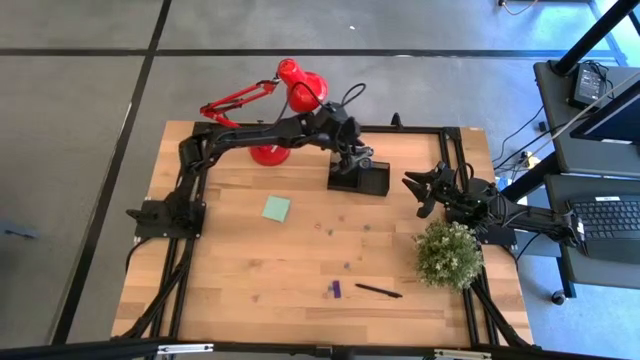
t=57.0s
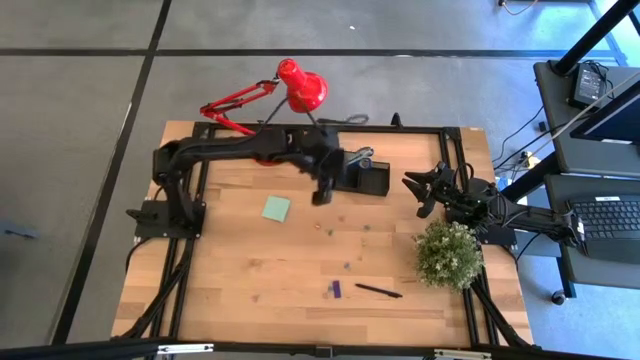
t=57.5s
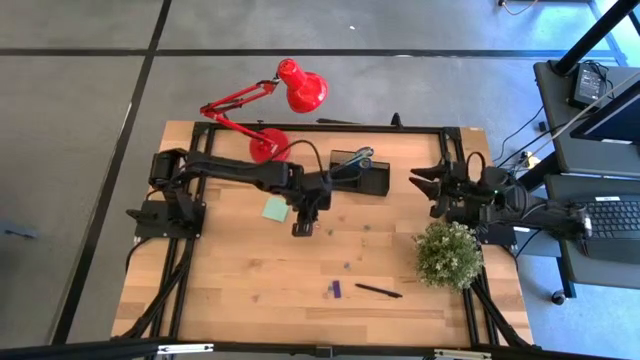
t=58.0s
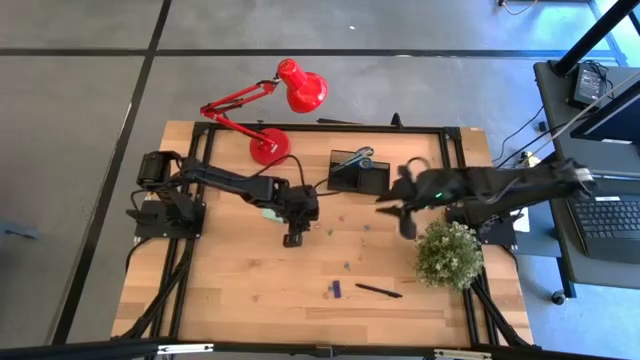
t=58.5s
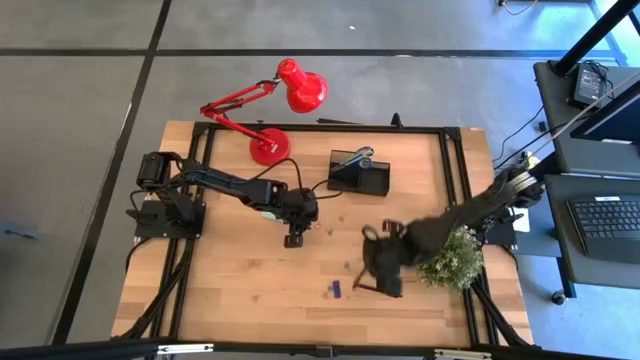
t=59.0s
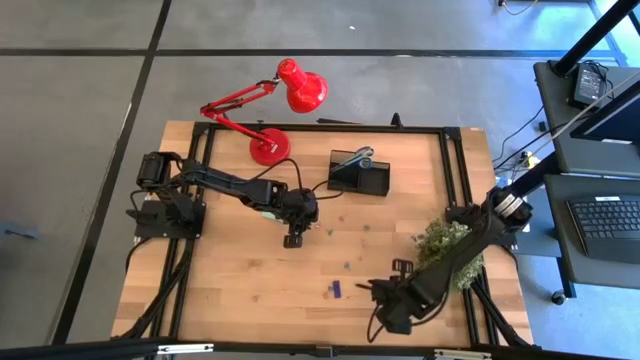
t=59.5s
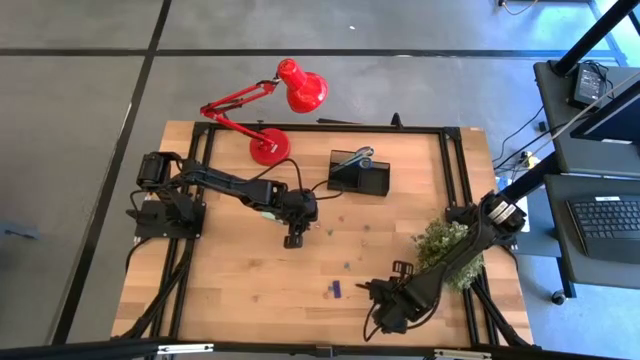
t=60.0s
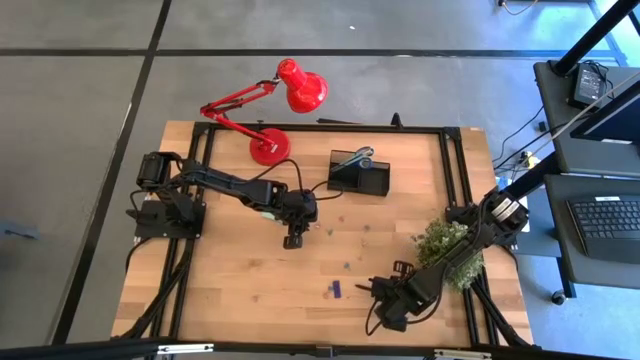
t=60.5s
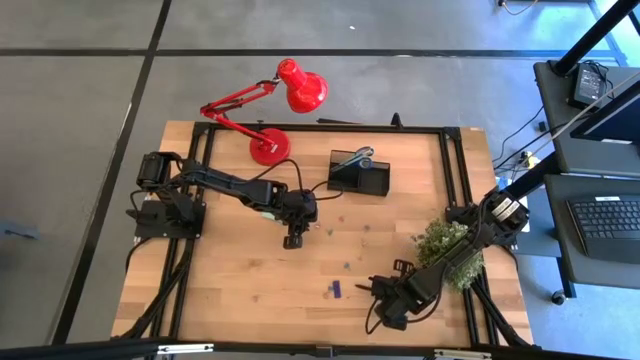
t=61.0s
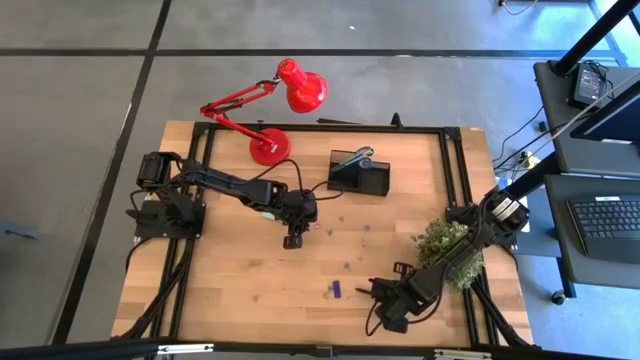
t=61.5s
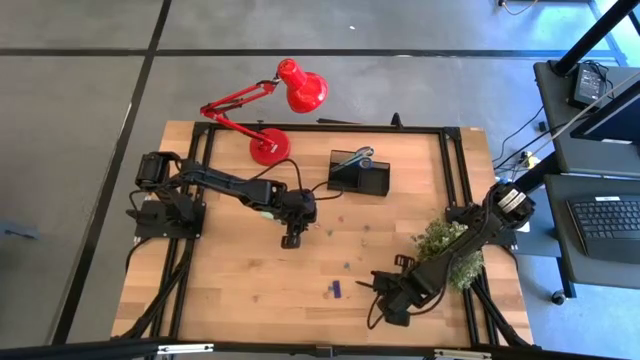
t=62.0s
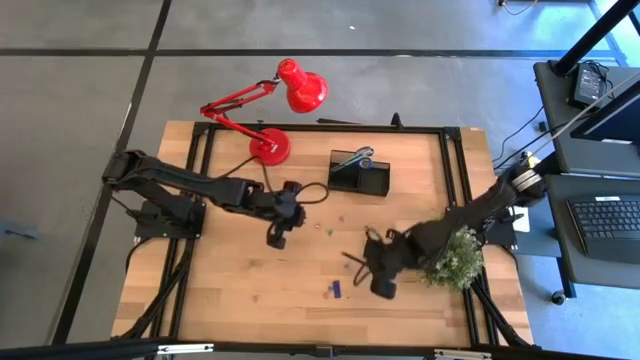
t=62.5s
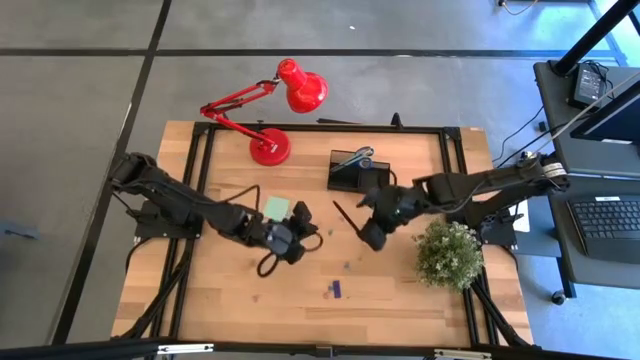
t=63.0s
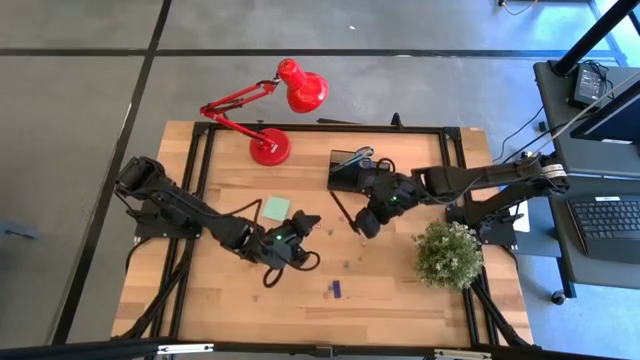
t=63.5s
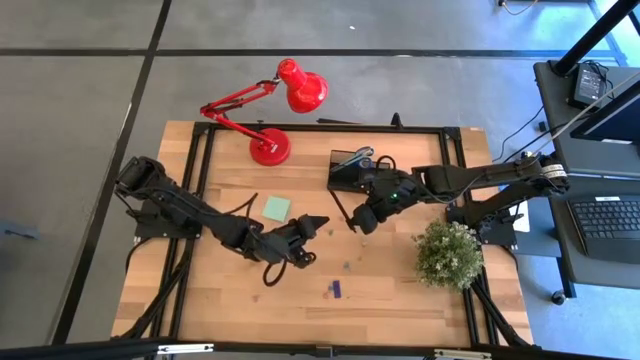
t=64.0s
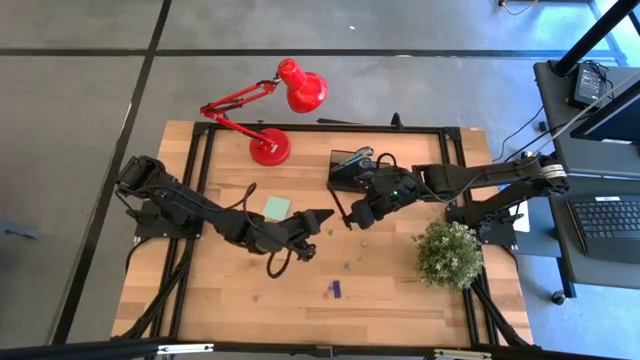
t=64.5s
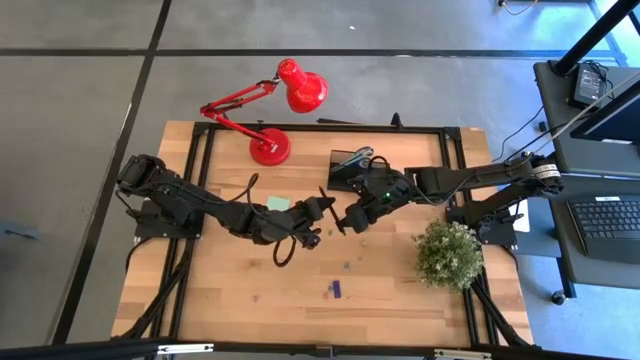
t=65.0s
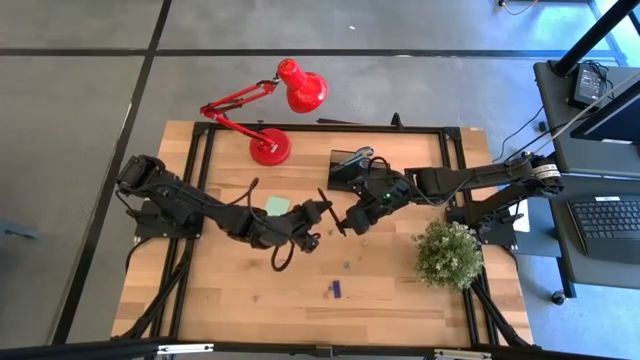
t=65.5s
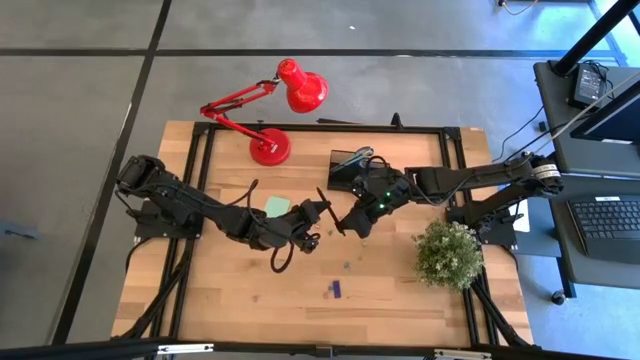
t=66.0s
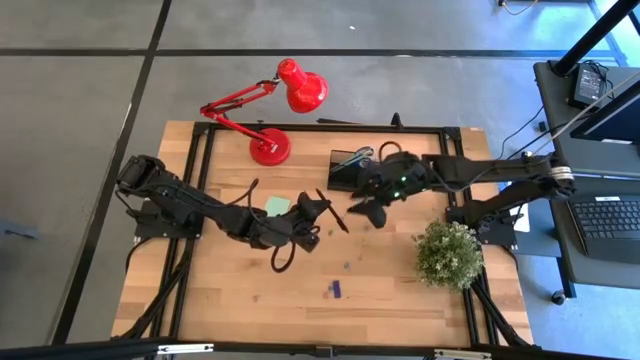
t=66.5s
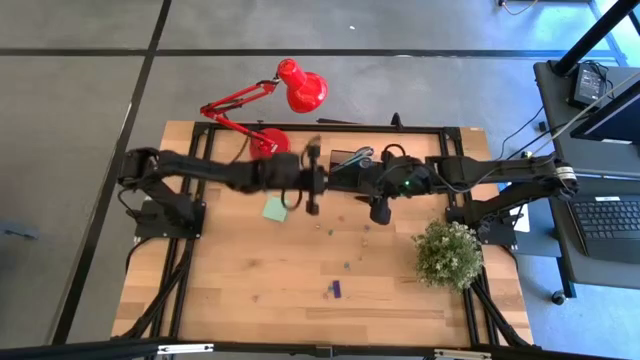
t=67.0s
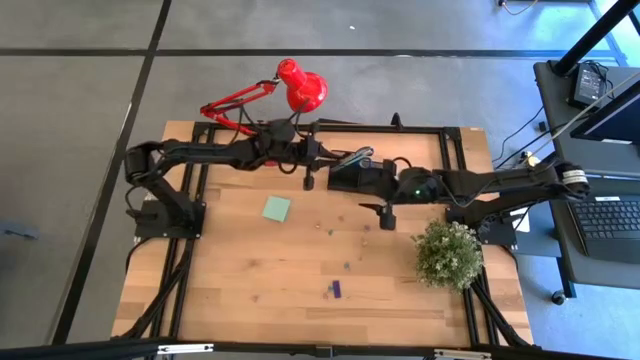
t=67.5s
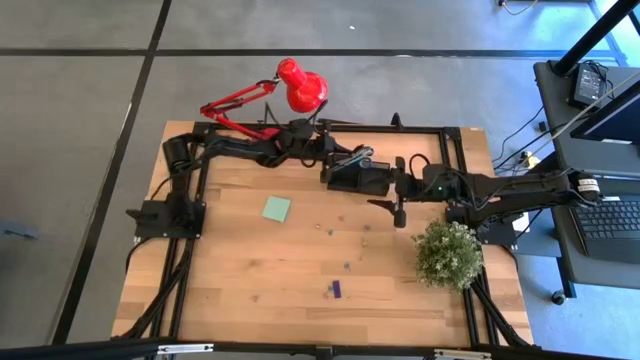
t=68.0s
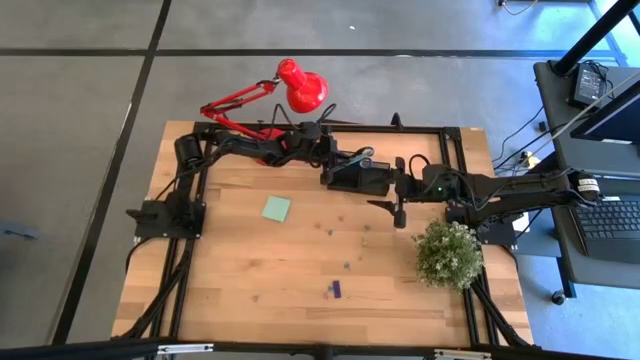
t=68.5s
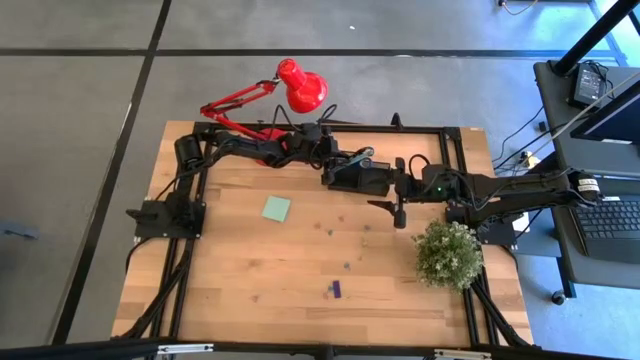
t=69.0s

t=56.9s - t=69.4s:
Task: Pick and place office supplies into organizer
Put the black pen into the black desk organizer

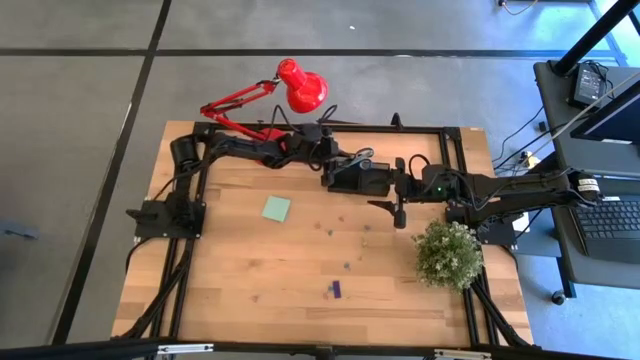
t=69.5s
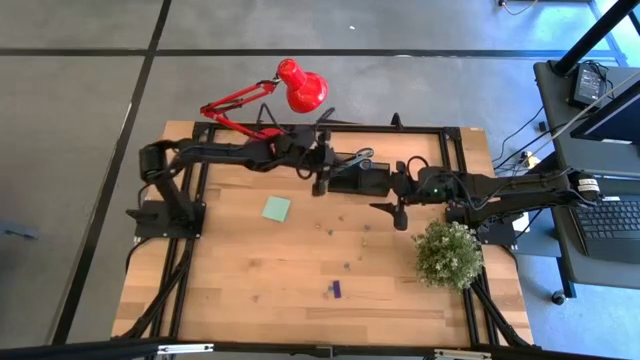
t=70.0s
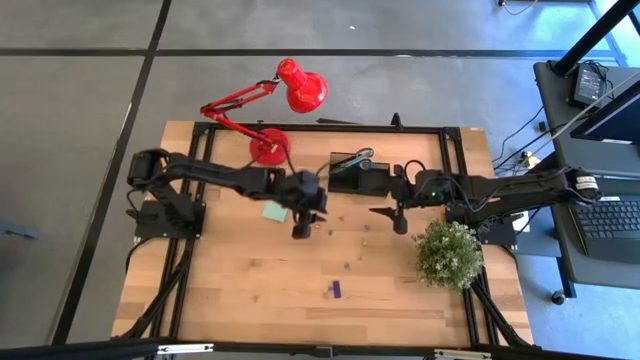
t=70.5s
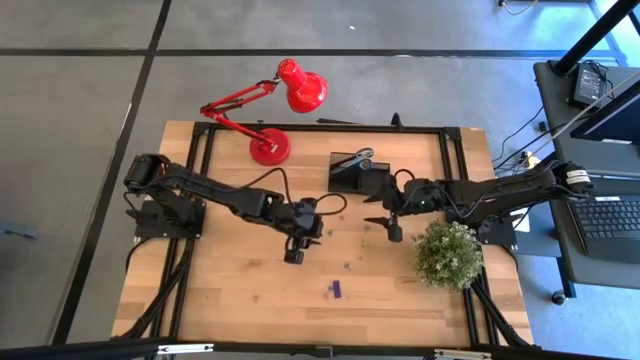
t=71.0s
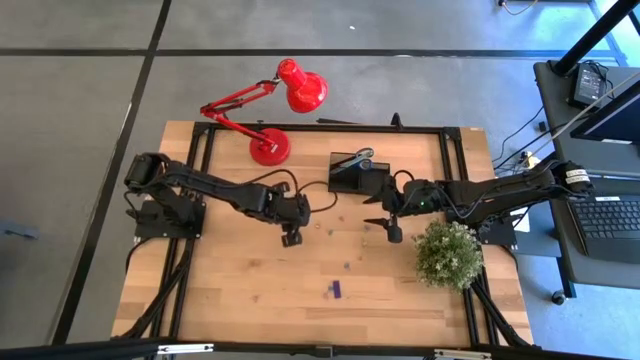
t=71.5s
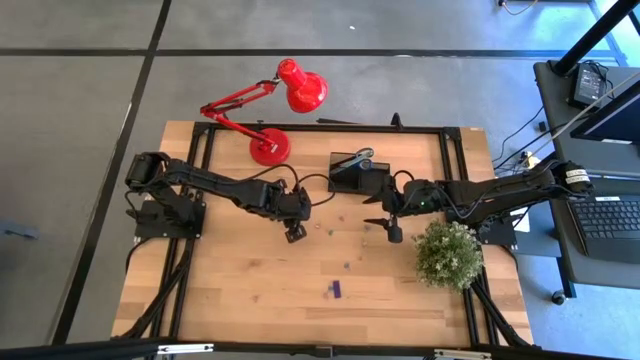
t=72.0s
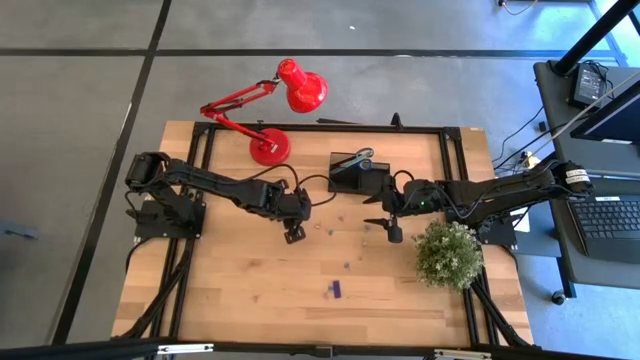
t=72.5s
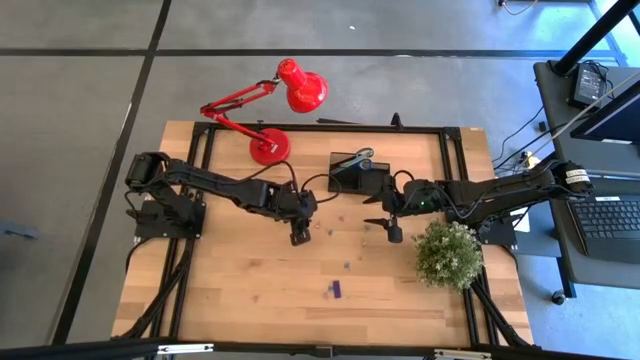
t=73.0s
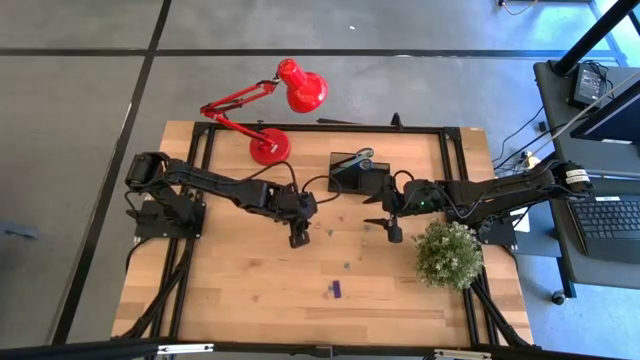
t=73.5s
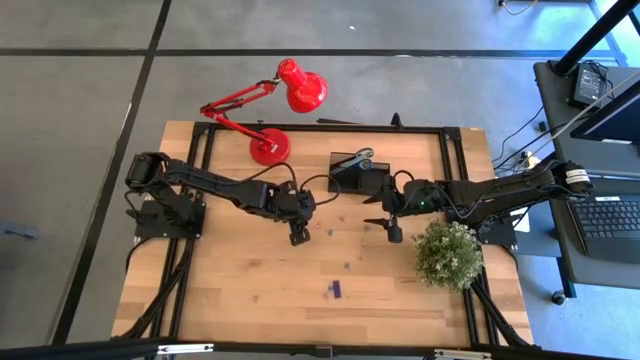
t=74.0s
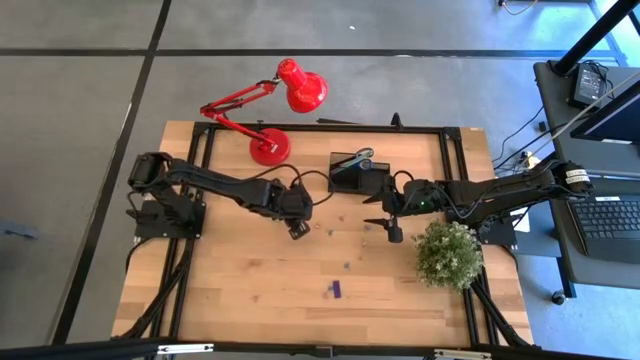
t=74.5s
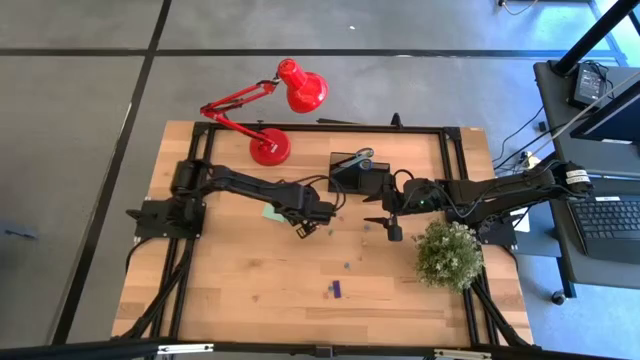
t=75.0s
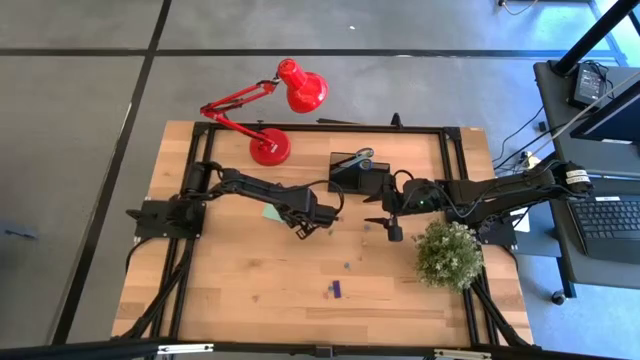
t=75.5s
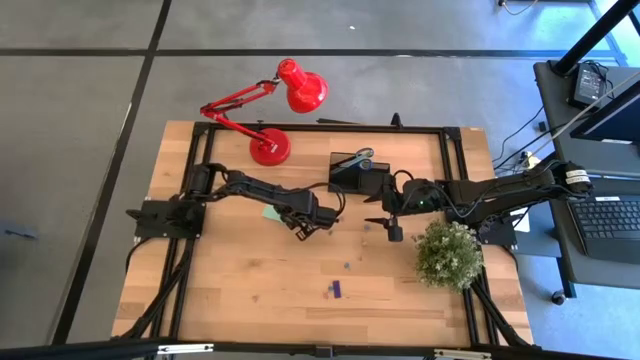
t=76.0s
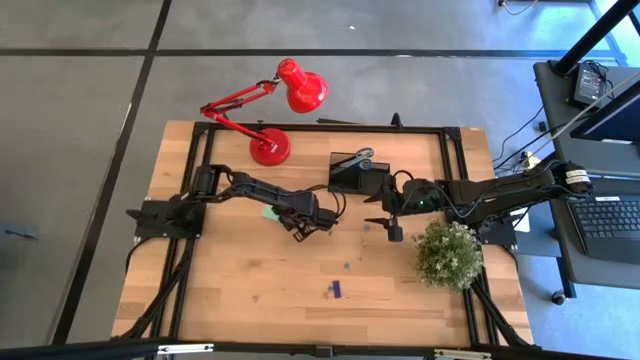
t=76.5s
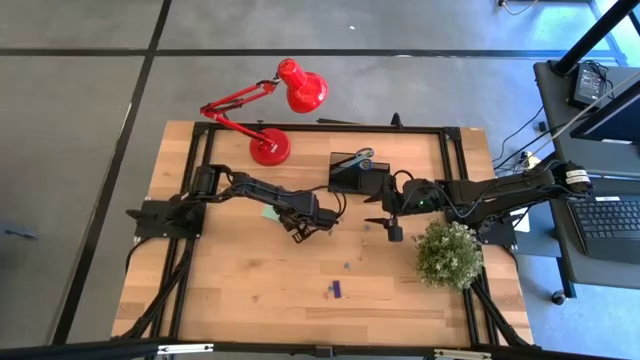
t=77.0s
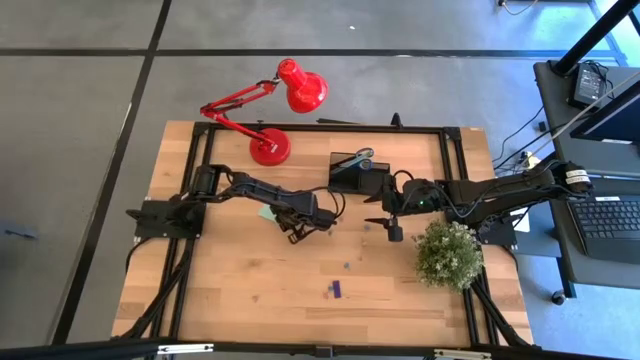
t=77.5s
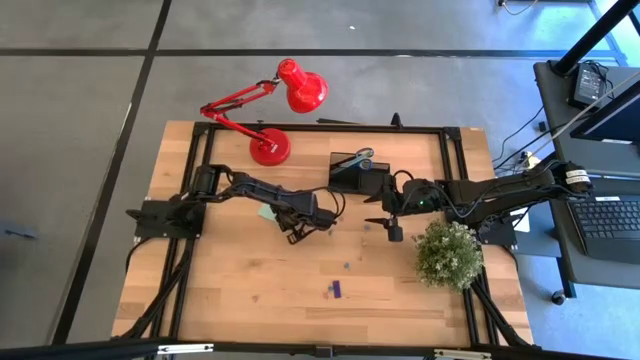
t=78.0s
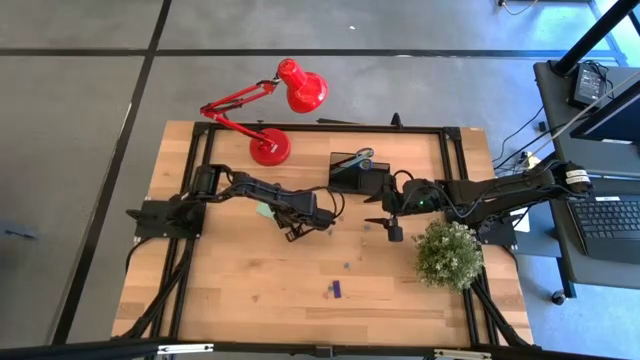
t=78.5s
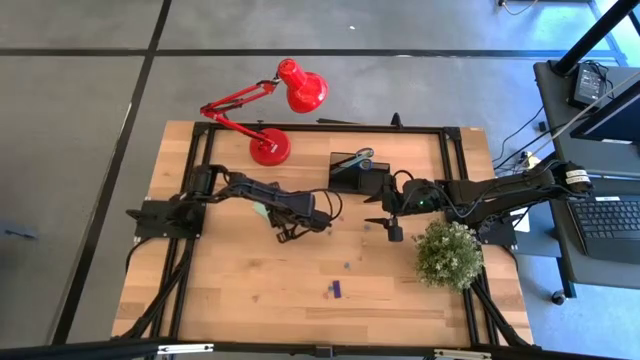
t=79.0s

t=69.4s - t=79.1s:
Put the blue sticky notes into the black desk organizer
